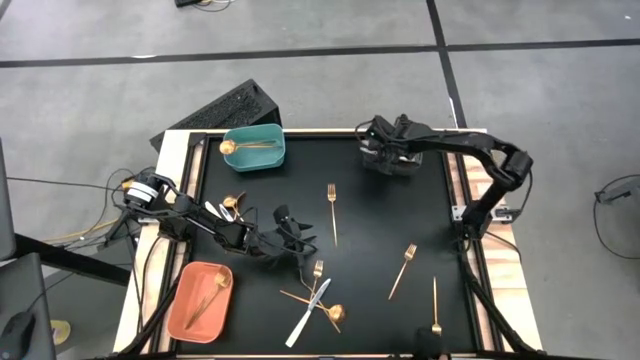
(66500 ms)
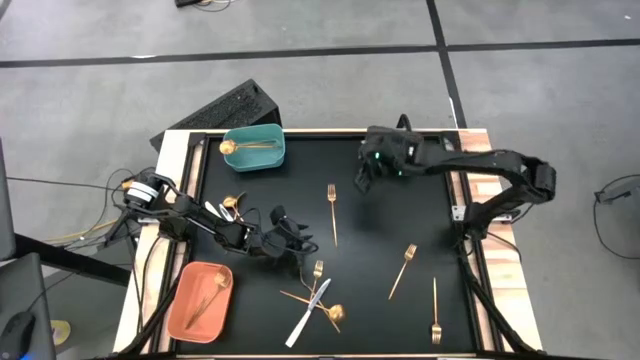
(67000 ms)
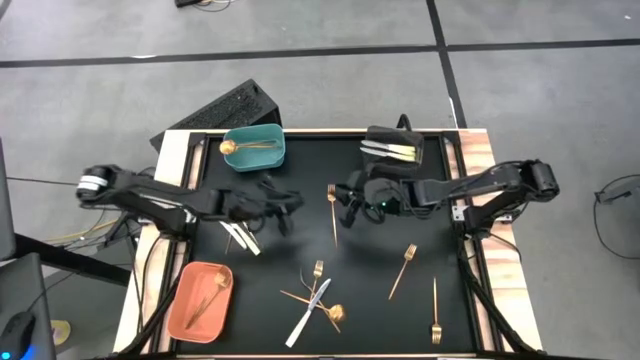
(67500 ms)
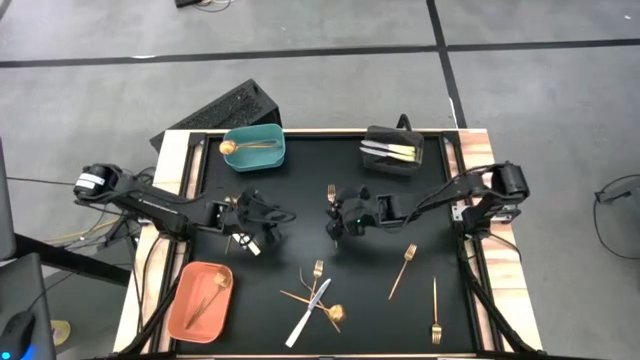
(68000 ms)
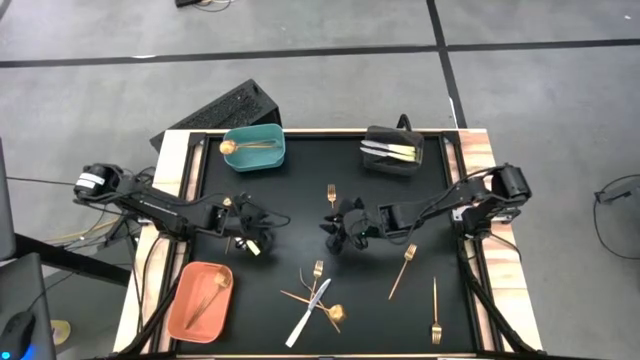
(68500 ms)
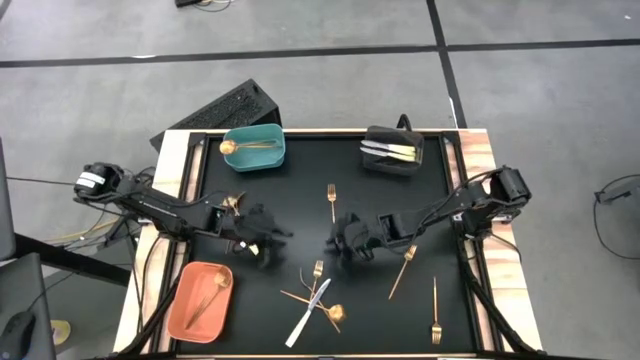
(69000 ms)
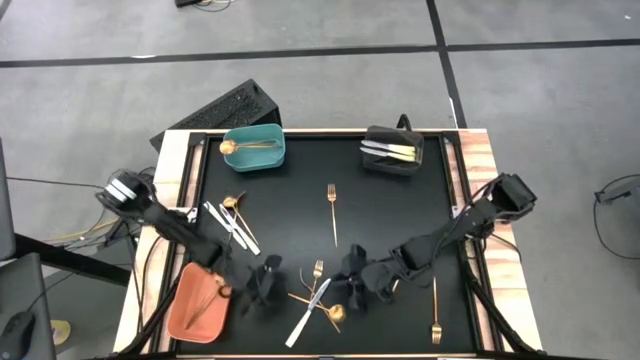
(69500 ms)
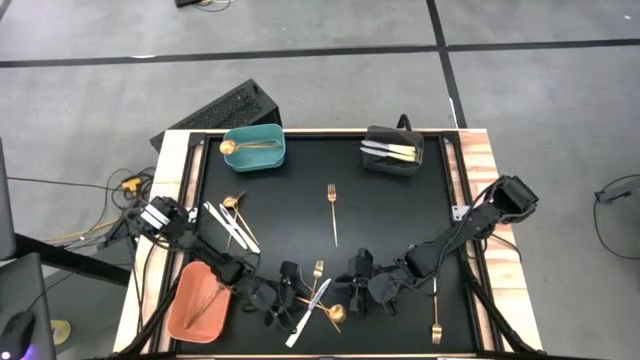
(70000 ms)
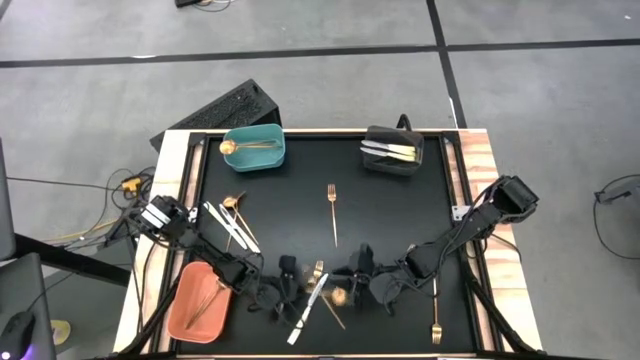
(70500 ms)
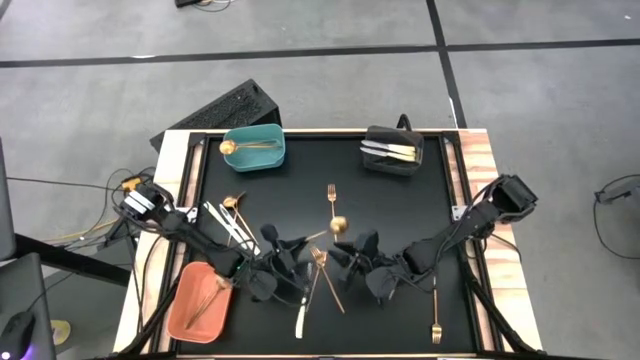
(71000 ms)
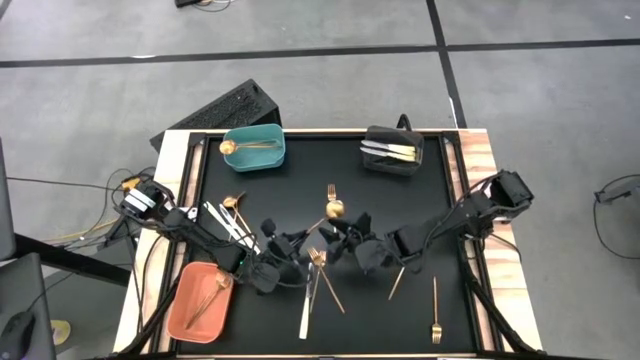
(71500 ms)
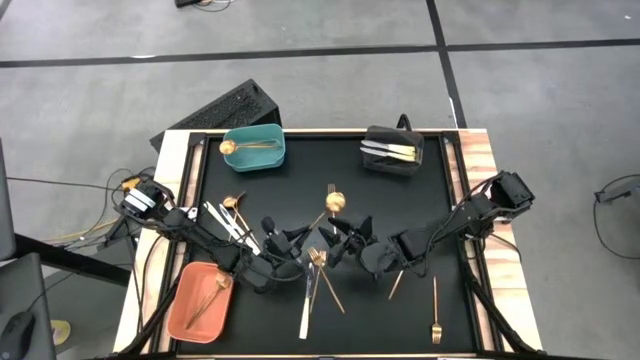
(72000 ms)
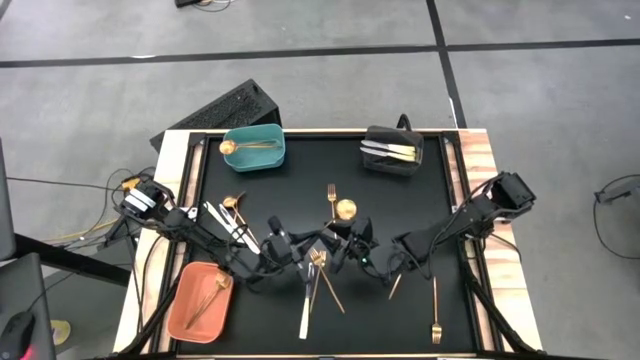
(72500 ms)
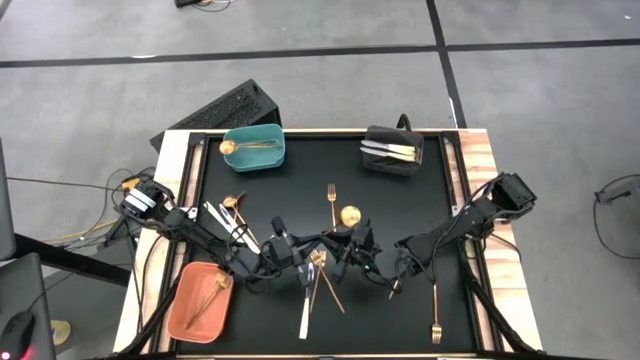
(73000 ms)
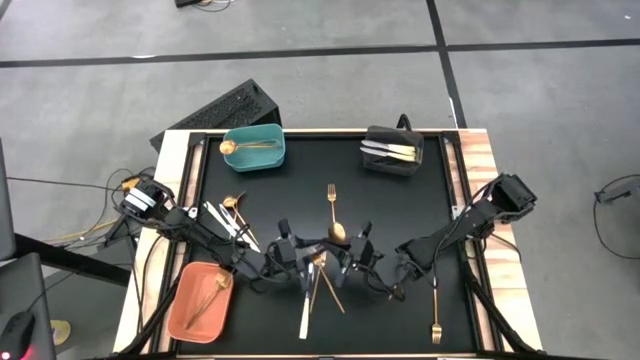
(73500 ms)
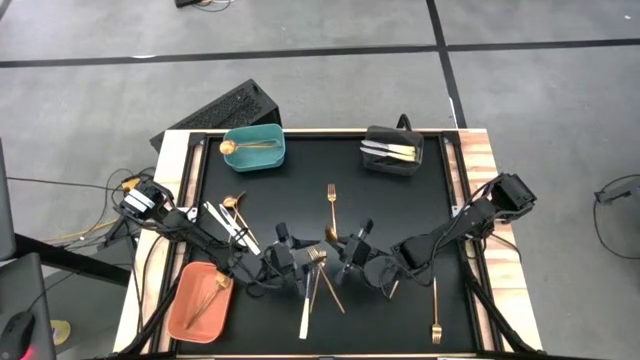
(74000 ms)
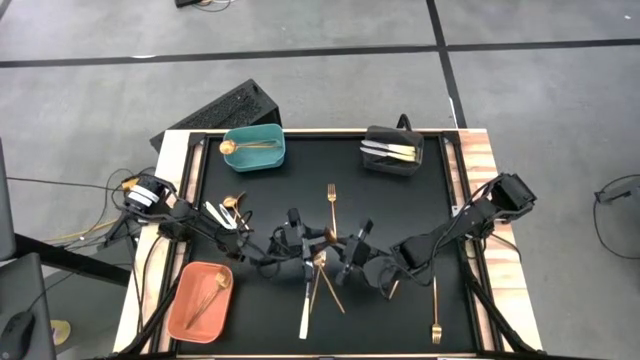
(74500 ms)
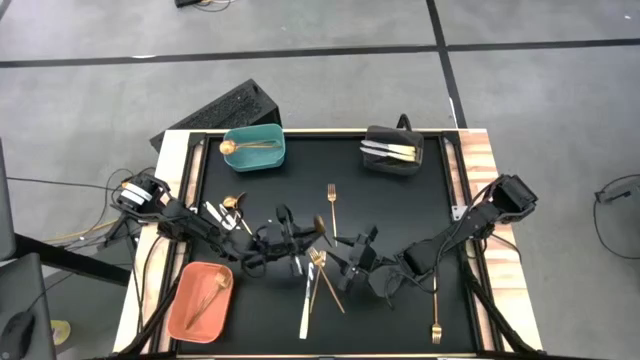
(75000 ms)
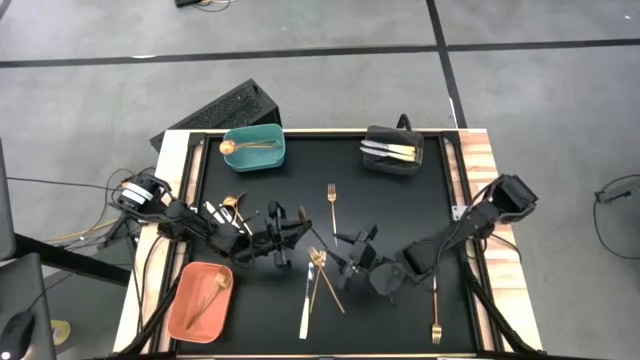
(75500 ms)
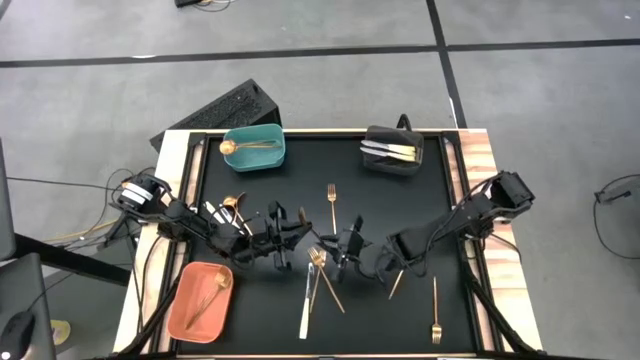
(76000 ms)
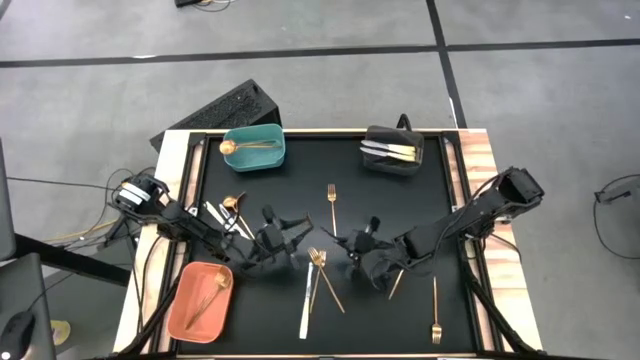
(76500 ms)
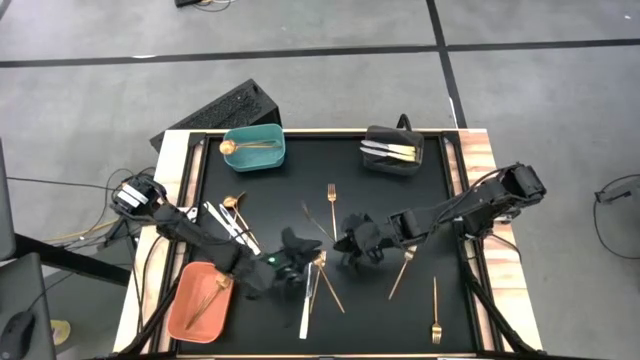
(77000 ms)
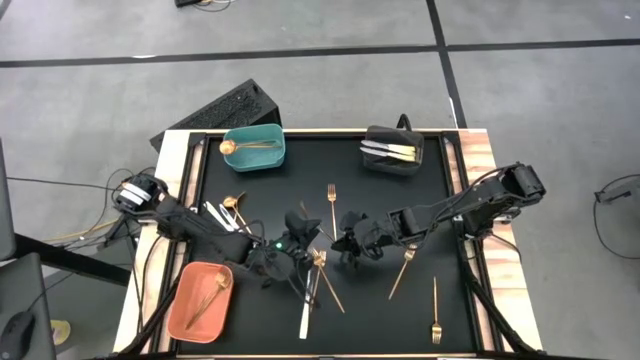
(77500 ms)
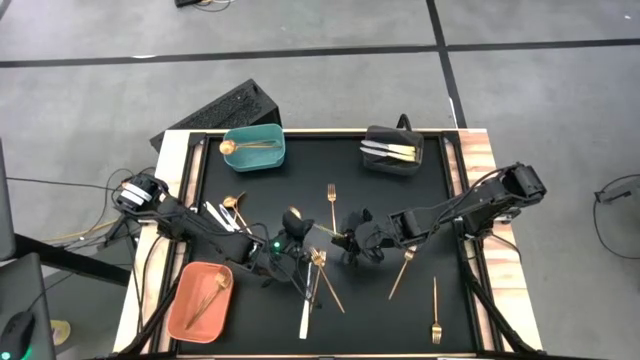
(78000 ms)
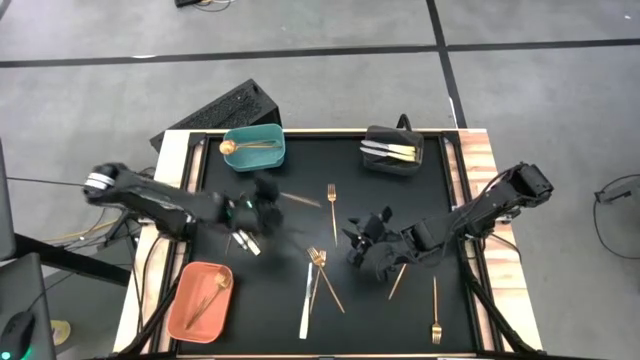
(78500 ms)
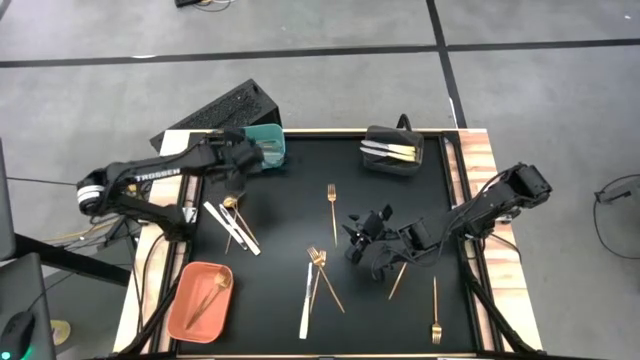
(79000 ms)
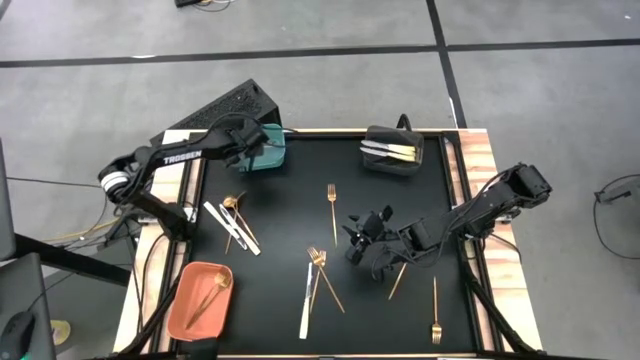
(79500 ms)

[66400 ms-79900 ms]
Task: Sort silverware by color (type)
Put the gold spoon into the green bin

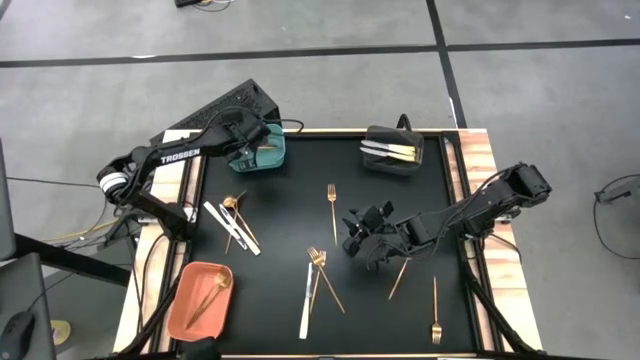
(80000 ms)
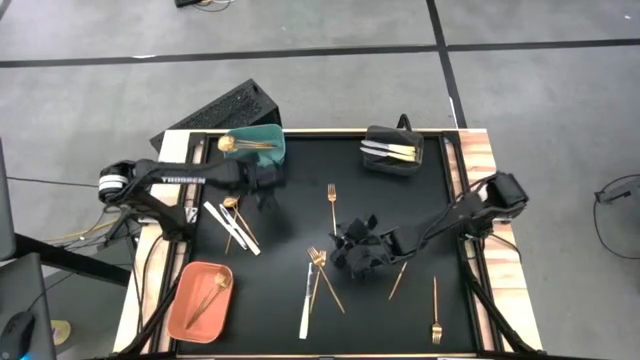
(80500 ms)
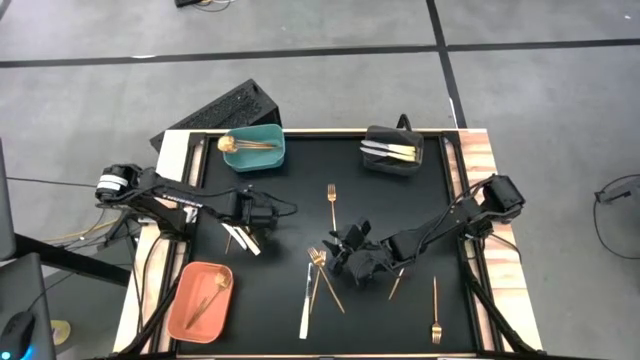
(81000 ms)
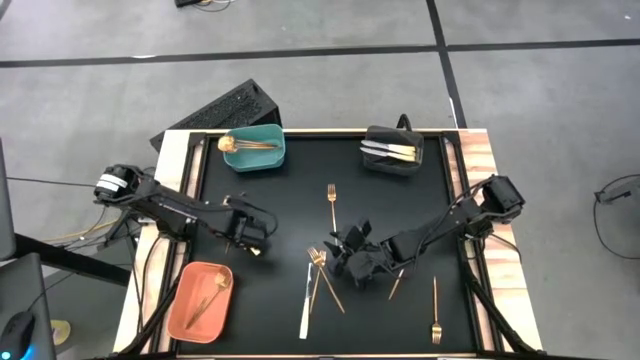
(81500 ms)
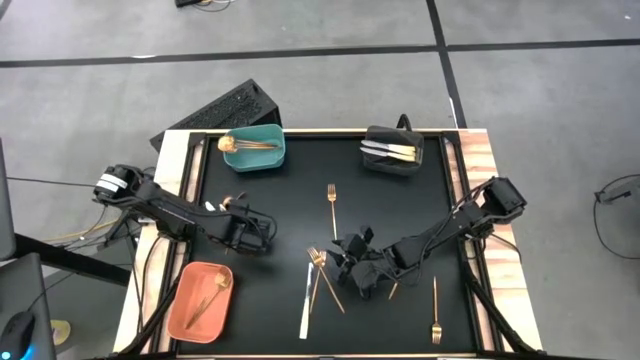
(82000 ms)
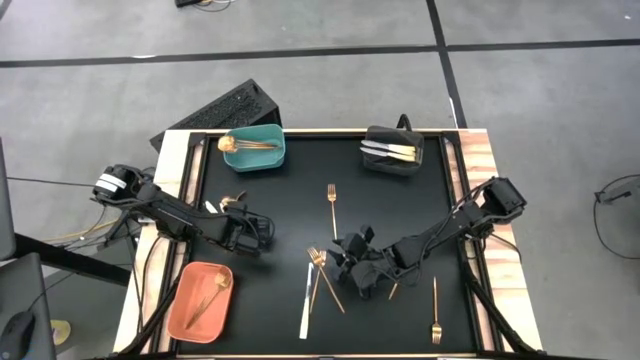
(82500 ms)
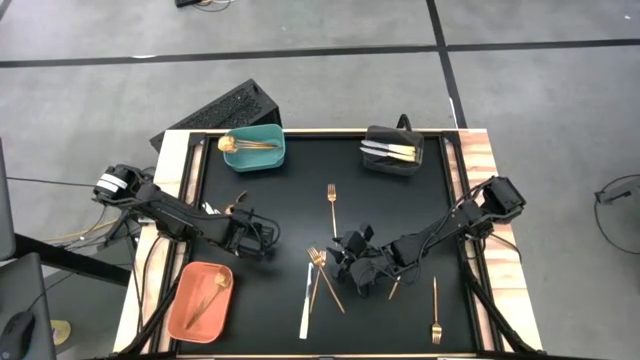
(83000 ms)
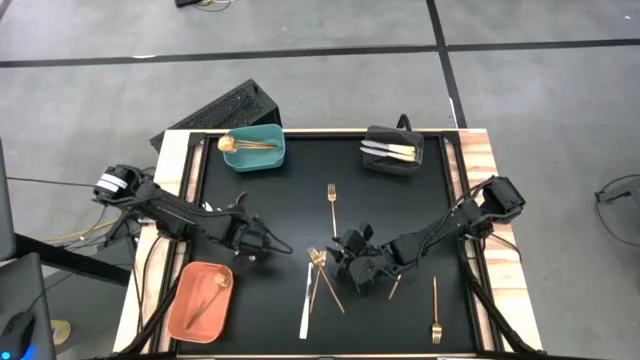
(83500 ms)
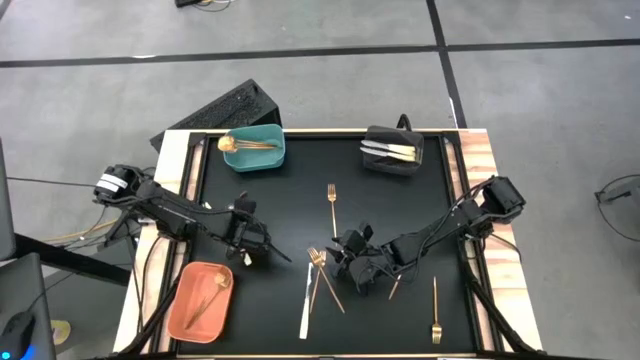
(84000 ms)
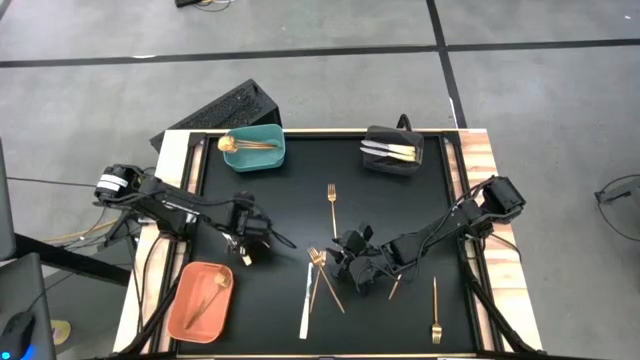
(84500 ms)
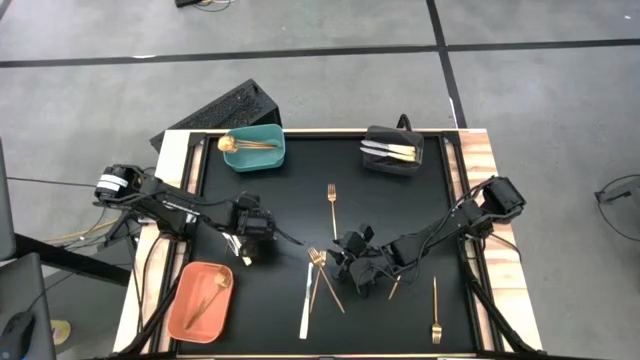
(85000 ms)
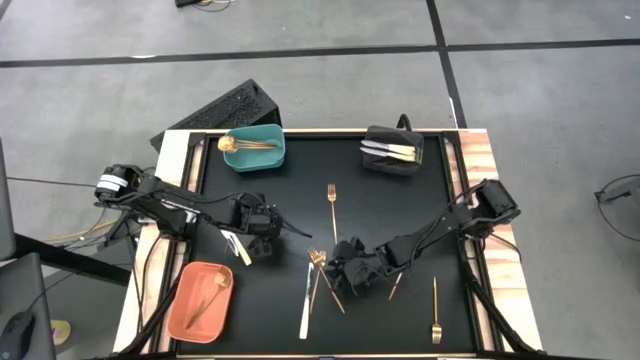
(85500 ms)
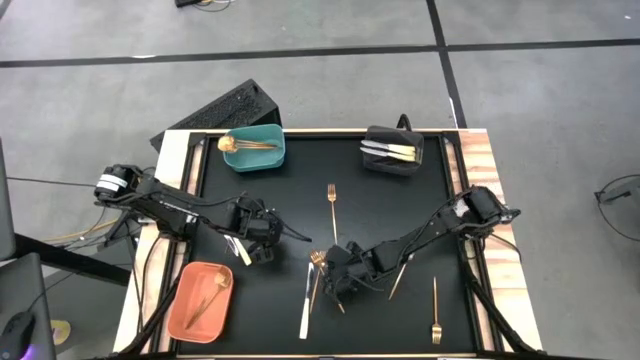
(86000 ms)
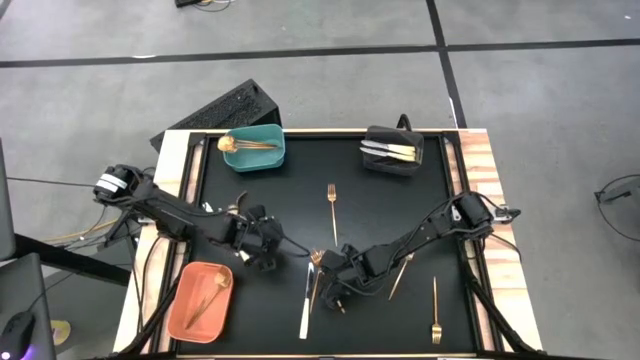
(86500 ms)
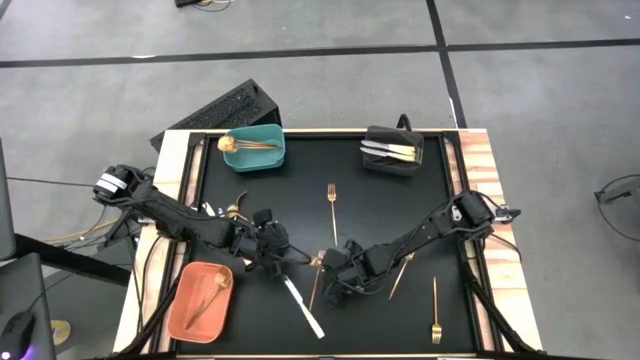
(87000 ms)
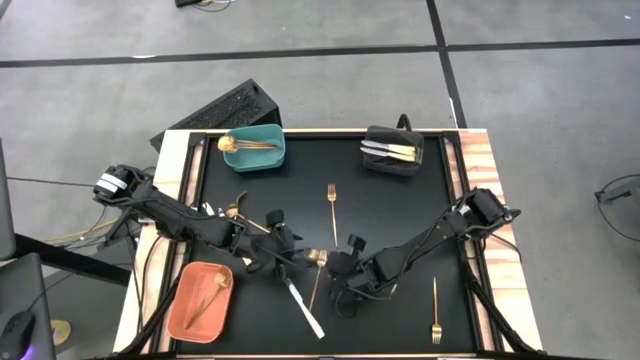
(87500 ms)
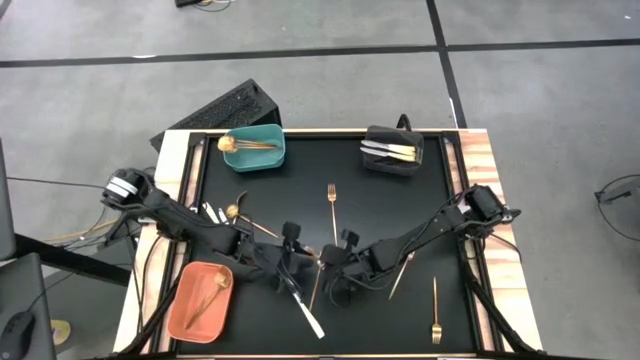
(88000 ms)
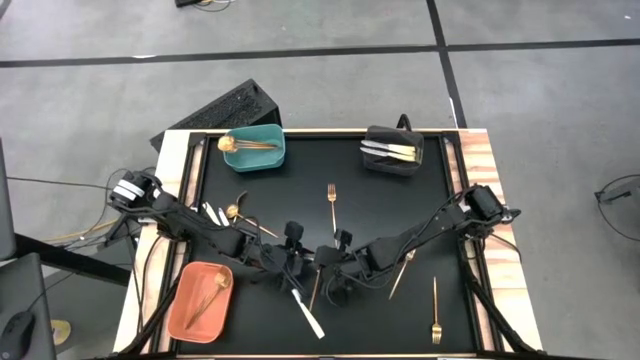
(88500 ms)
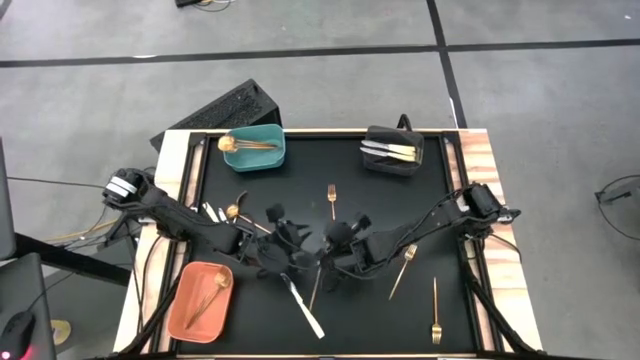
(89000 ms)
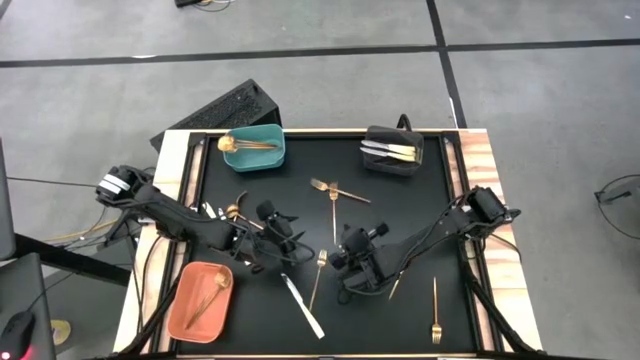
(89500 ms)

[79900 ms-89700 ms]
Put the gold fork into the orange bin
